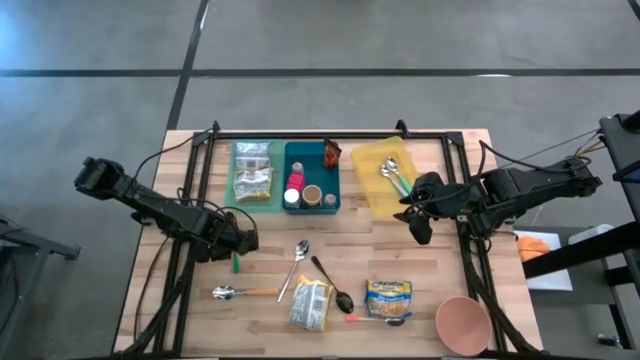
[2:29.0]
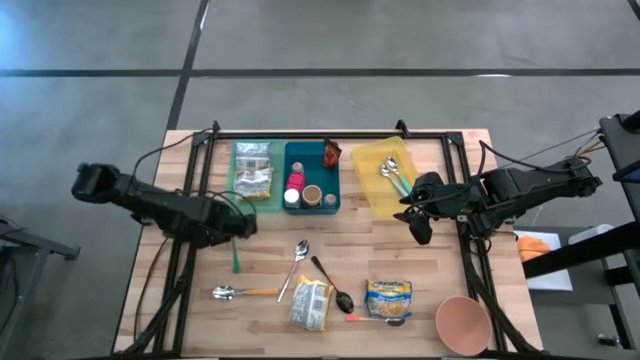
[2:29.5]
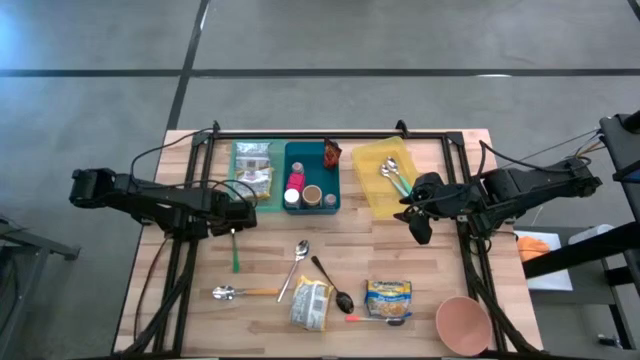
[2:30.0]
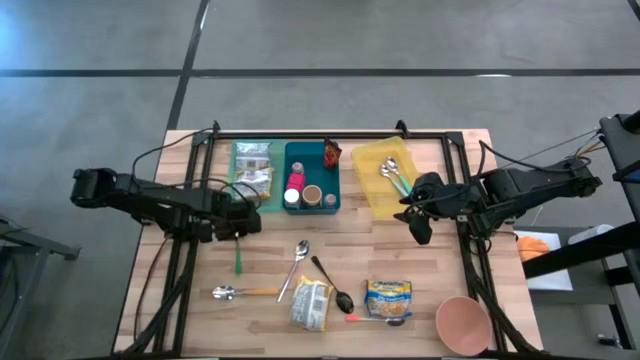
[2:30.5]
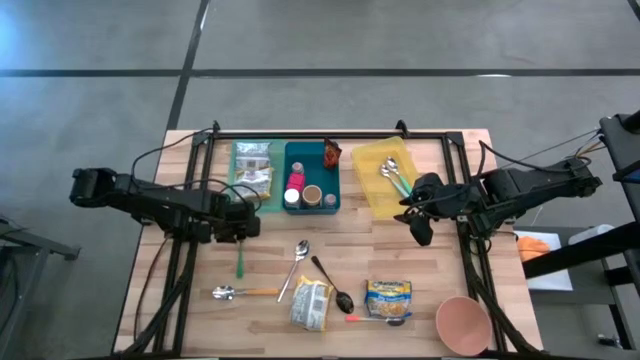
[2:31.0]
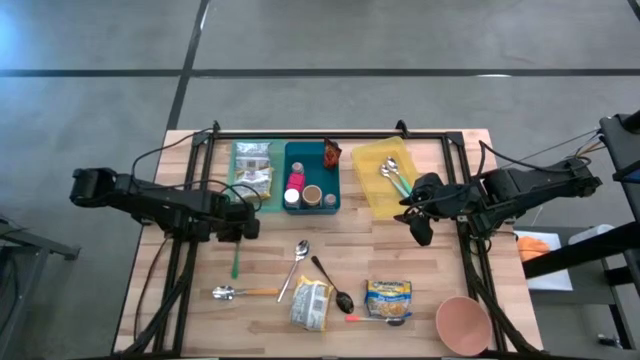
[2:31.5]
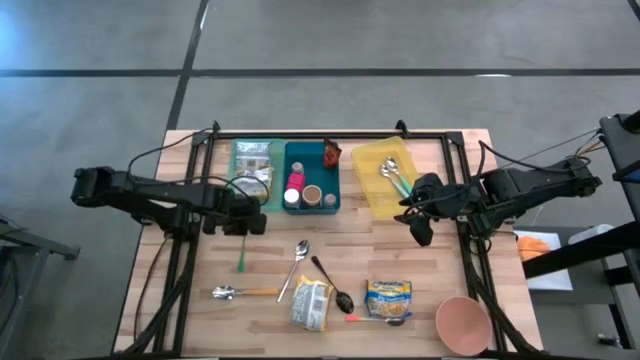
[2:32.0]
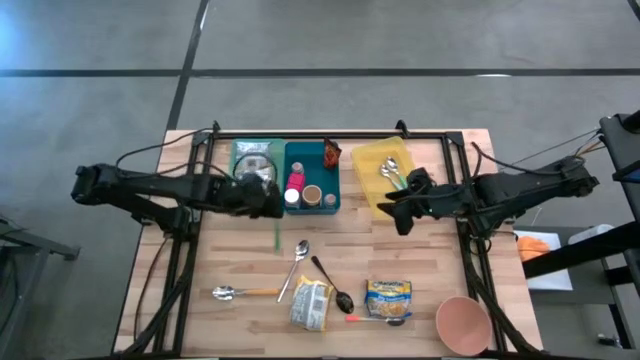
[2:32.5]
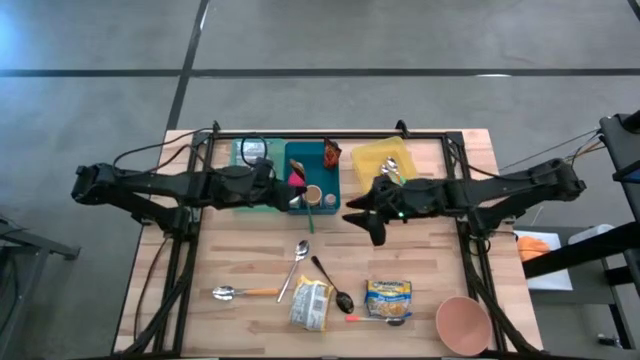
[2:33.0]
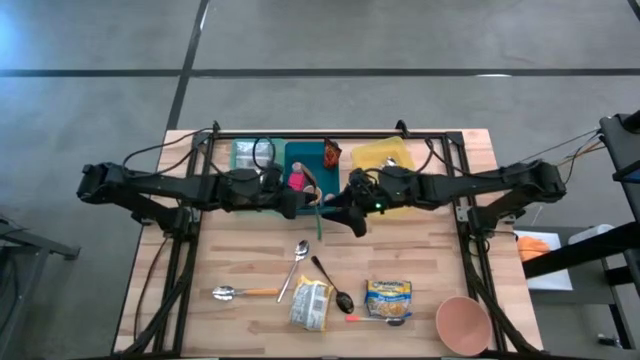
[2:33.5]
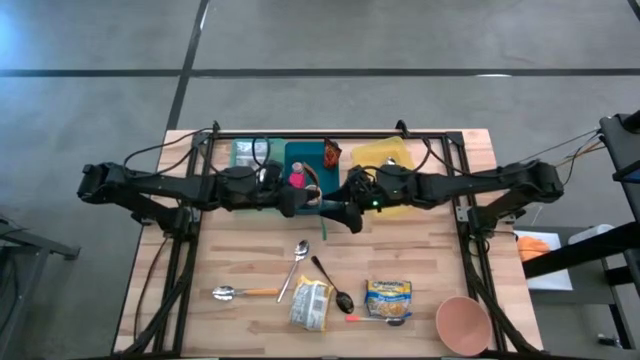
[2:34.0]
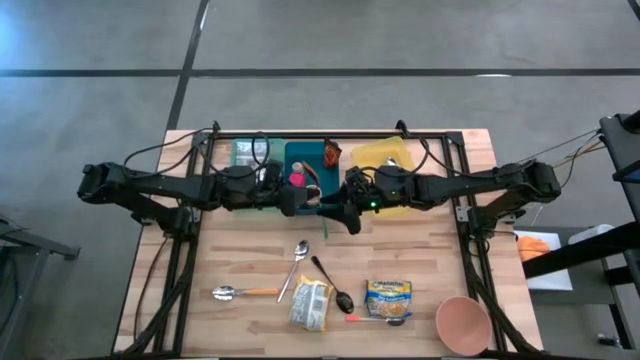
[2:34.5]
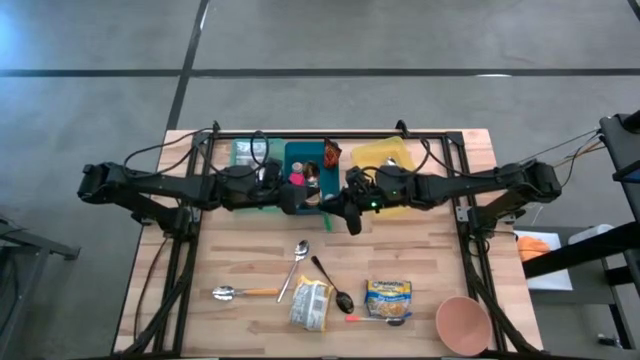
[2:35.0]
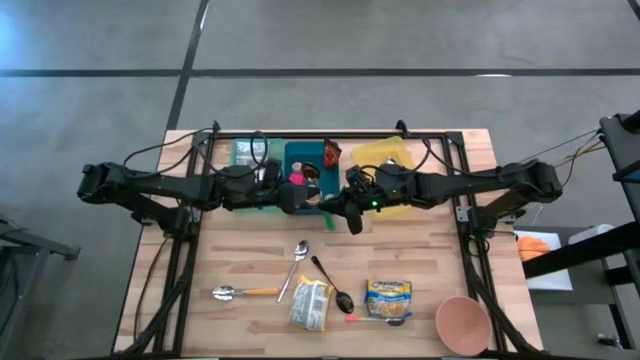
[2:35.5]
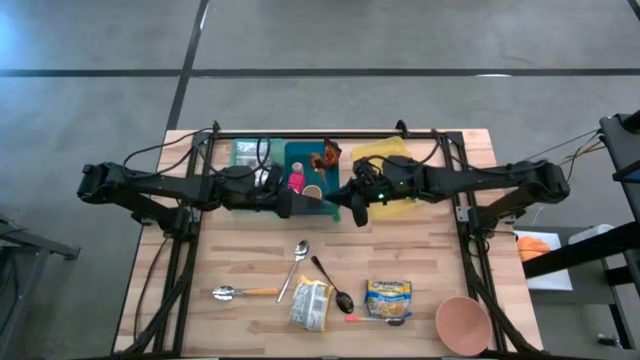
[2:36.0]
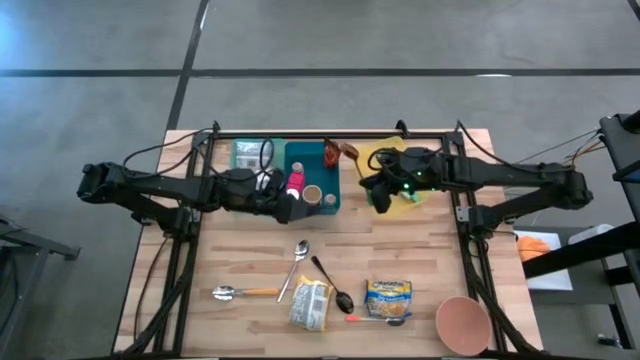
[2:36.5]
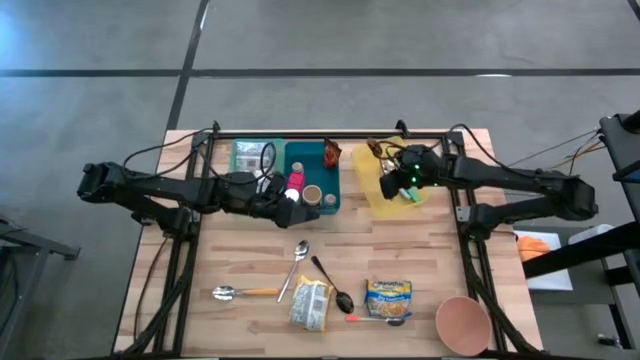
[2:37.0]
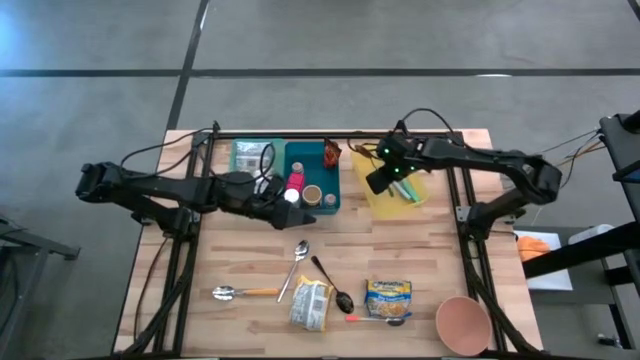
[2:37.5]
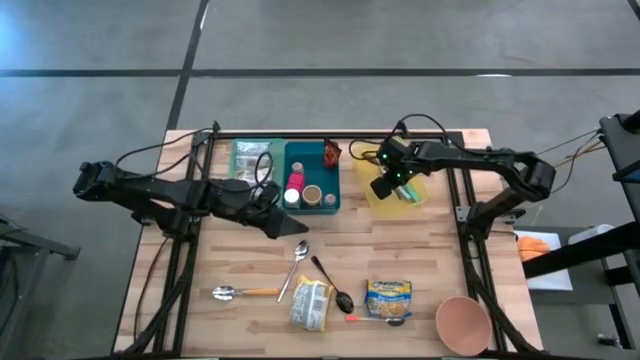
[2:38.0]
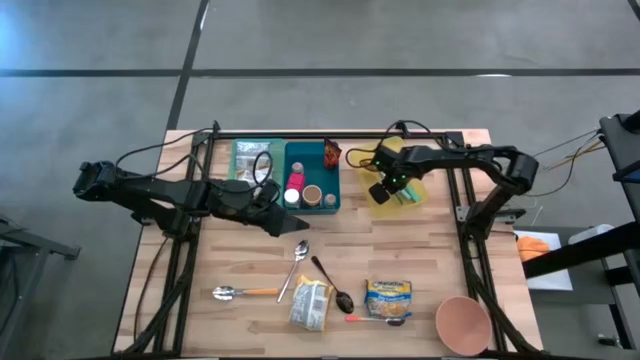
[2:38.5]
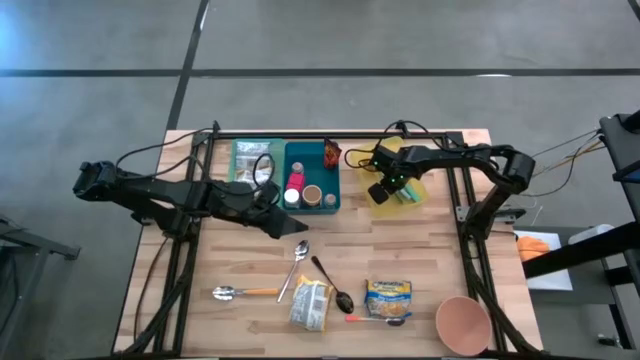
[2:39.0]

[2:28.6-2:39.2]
Put the green spoon into the yellow bin

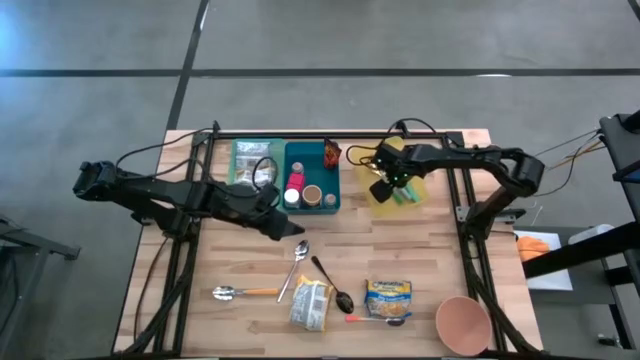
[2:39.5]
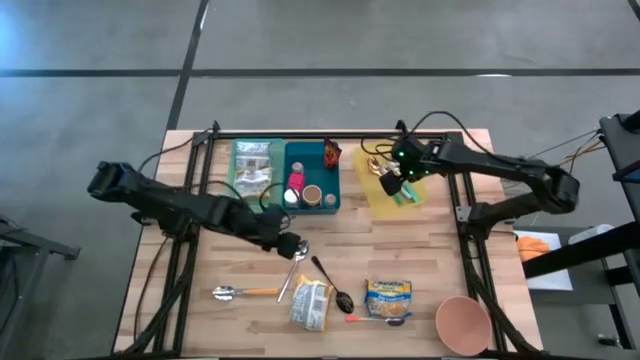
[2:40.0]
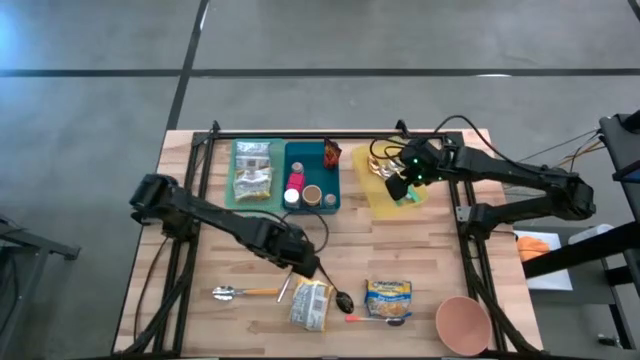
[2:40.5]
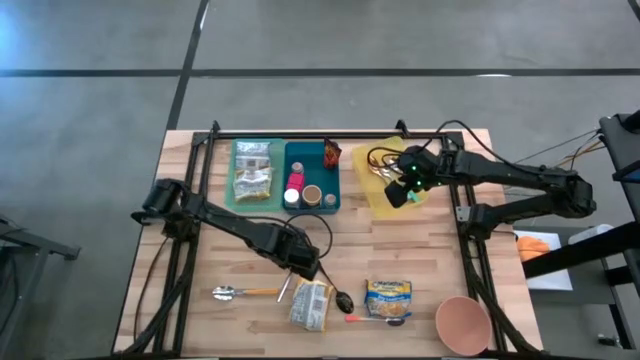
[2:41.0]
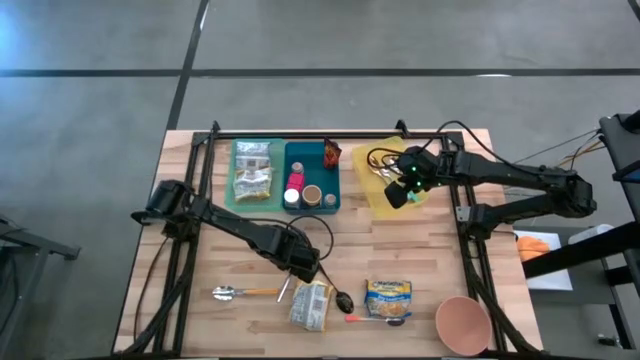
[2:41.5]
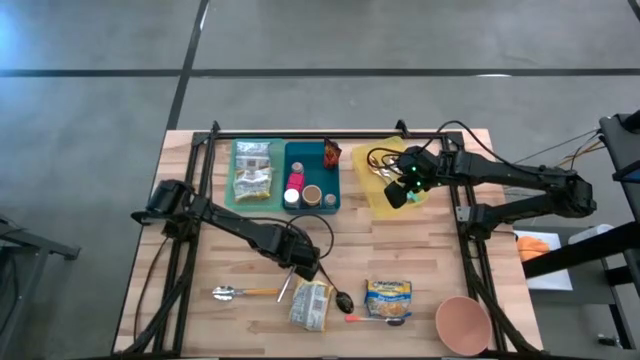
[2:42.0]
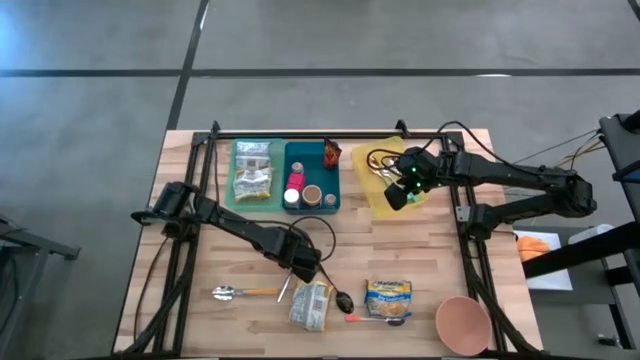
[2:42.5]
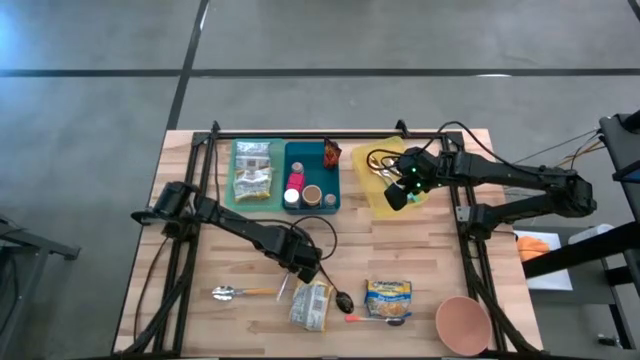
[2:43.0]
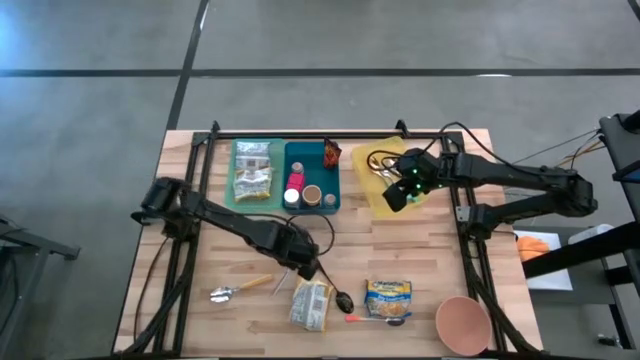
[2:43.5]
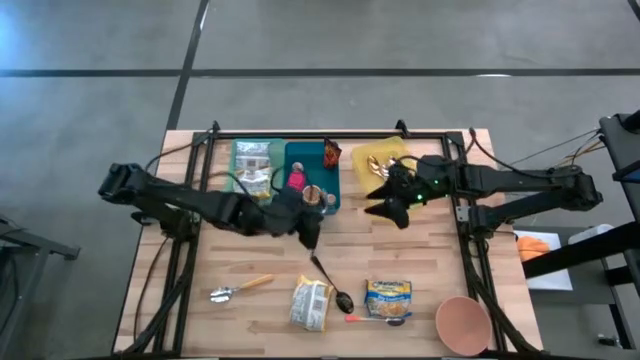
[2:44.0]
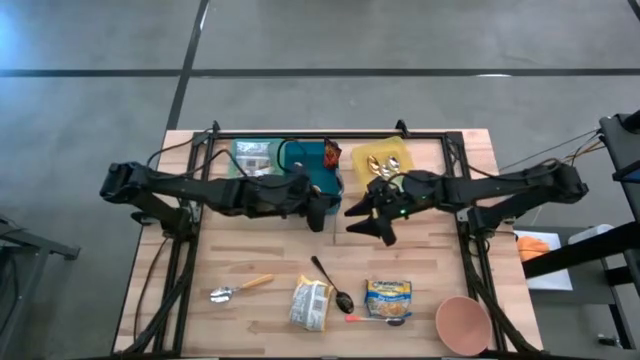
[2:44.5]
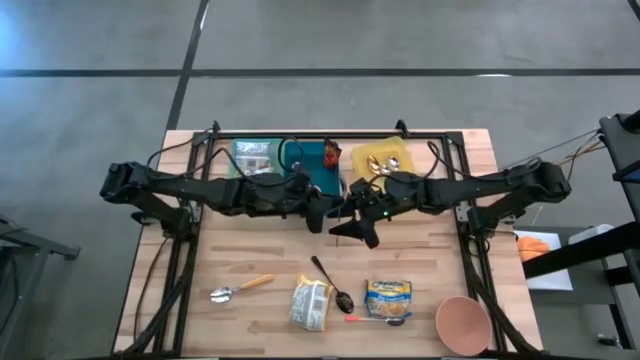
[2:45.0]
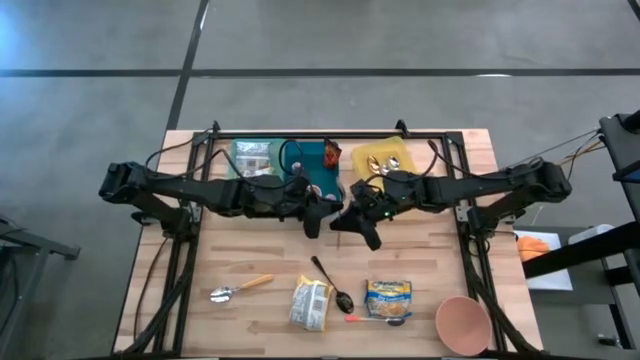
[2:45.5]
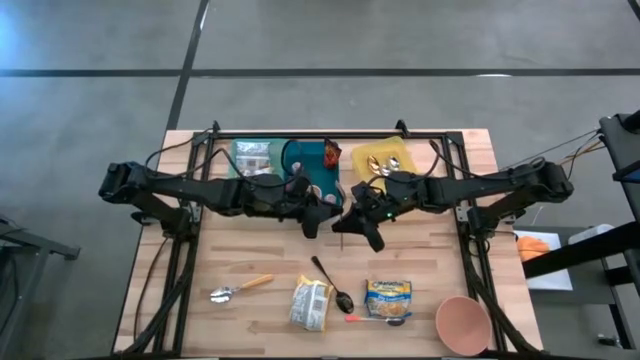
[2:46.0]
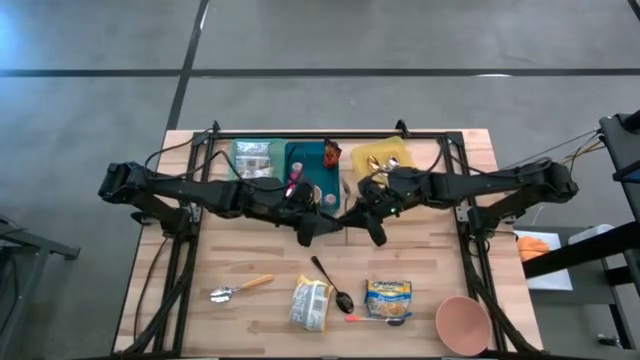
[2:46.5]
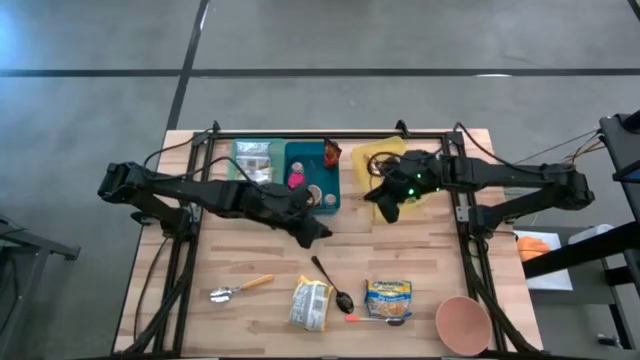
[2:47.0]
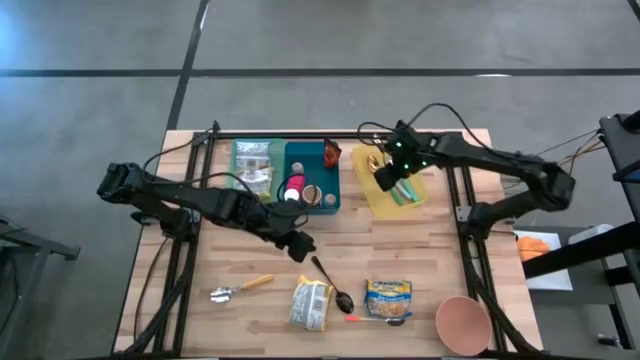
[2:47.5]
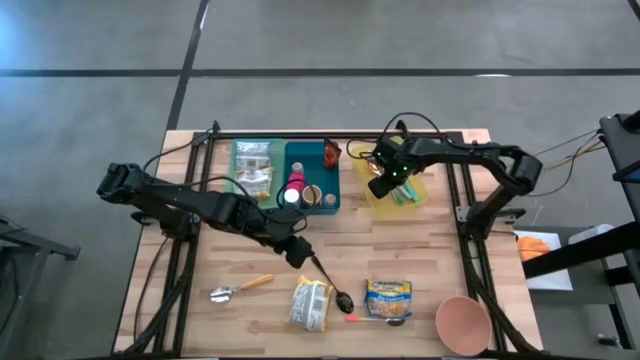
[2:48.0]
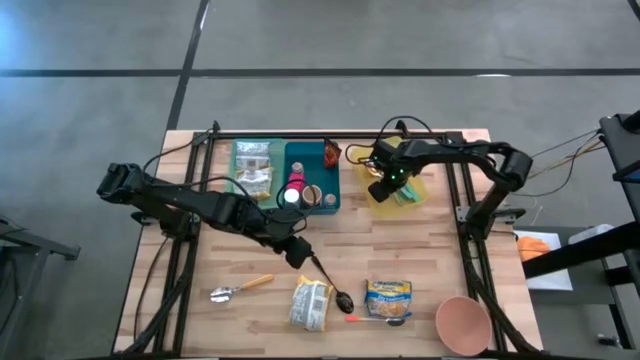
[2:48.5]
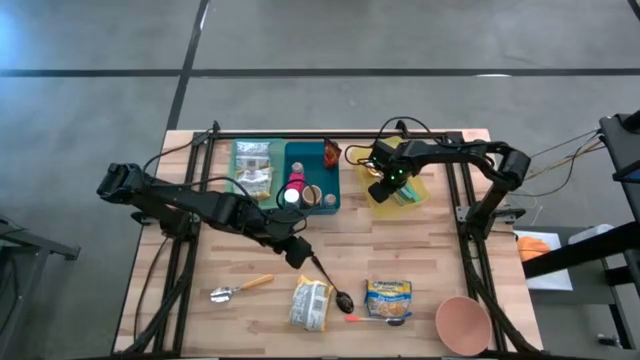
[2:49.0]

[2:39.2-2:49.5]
Put the silver spoon into the yellow bin
